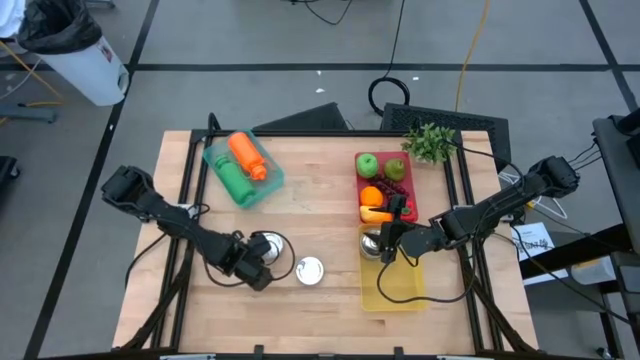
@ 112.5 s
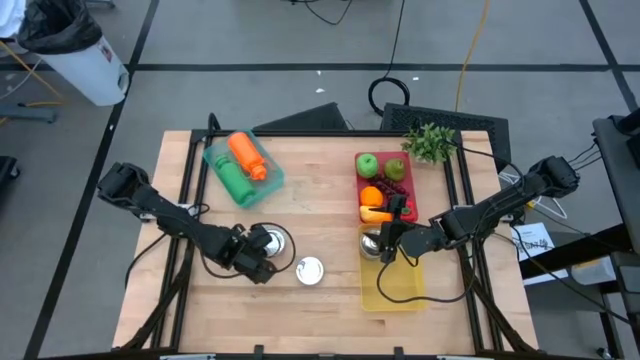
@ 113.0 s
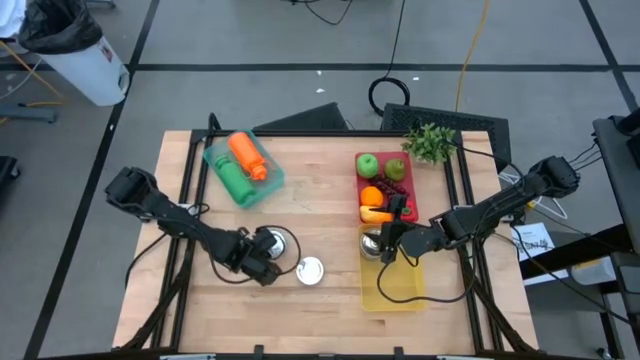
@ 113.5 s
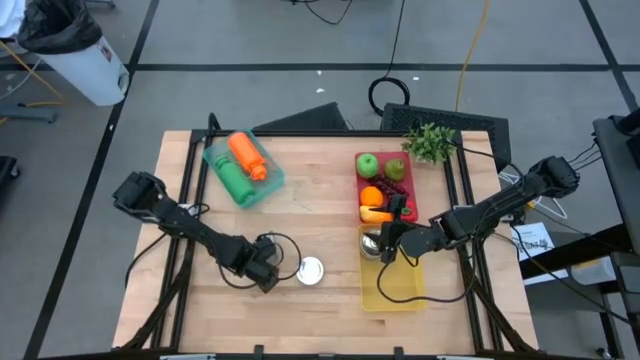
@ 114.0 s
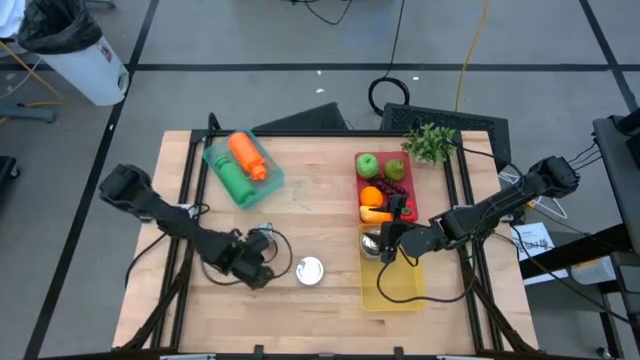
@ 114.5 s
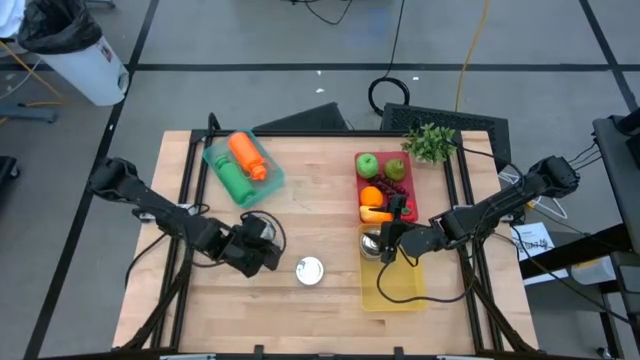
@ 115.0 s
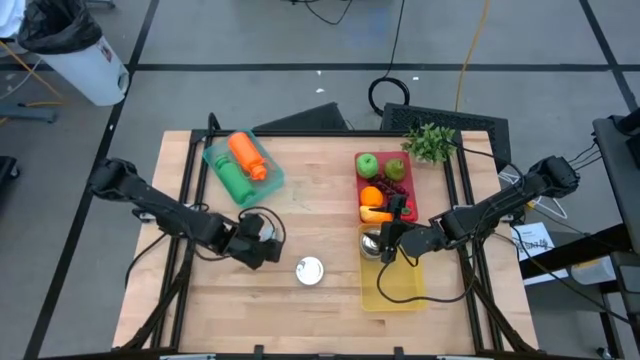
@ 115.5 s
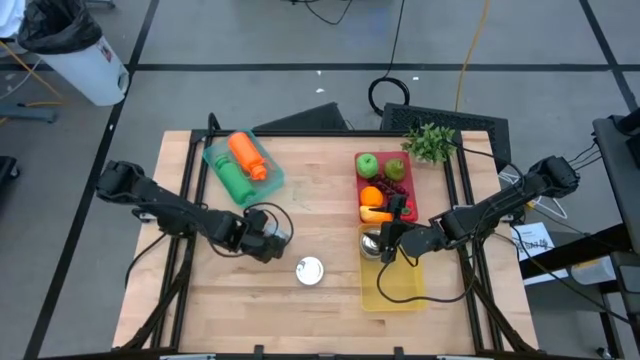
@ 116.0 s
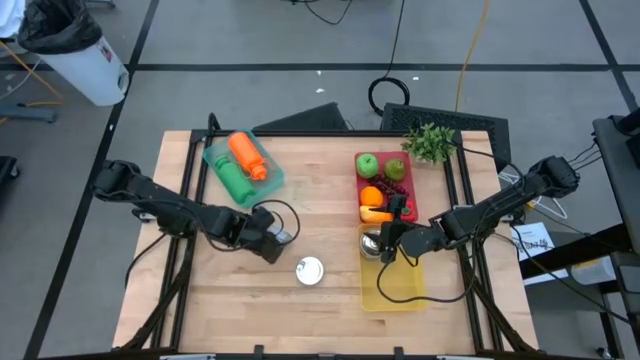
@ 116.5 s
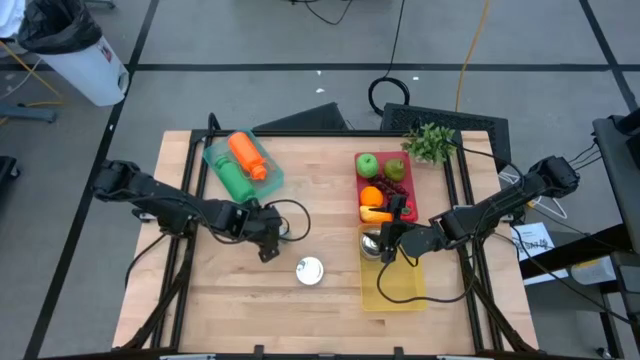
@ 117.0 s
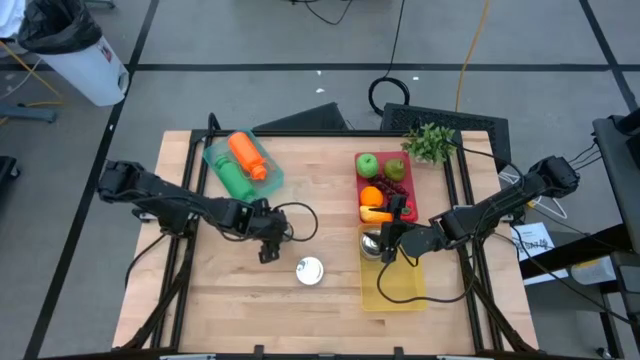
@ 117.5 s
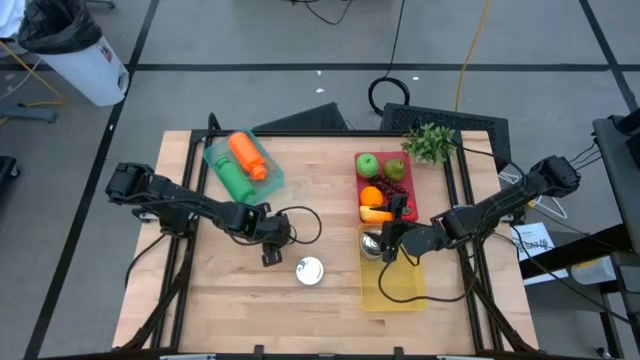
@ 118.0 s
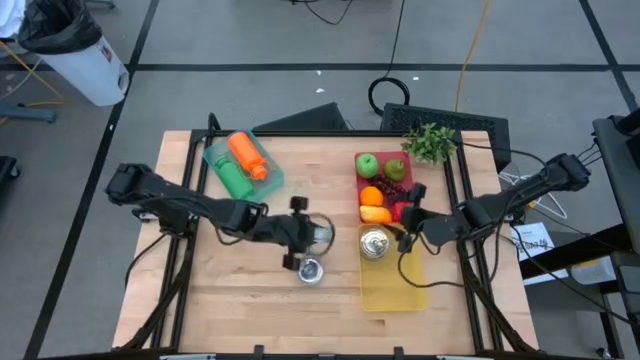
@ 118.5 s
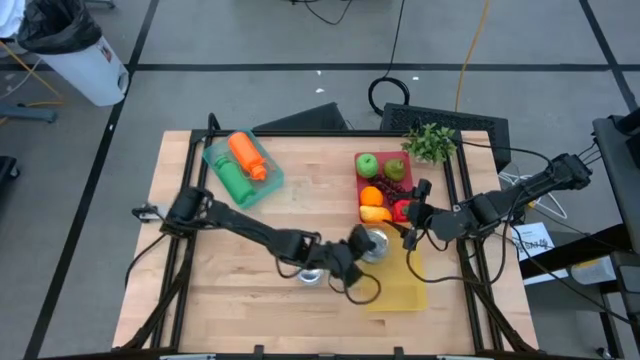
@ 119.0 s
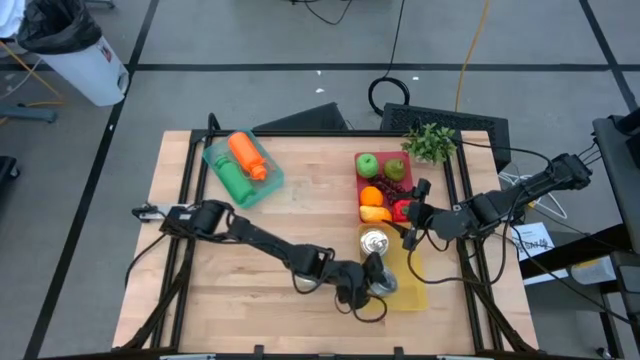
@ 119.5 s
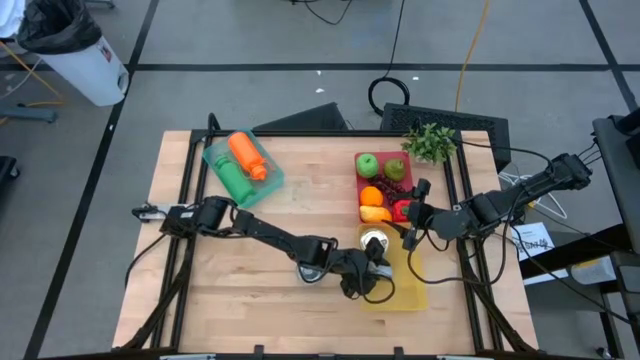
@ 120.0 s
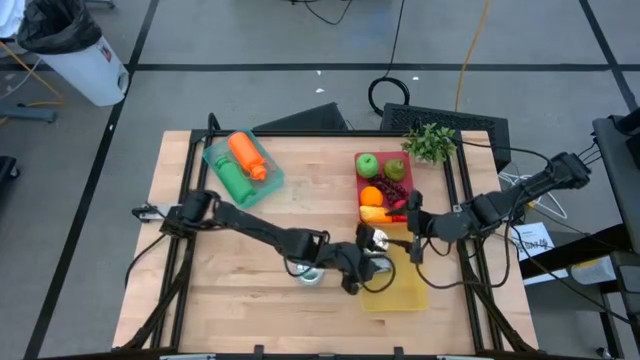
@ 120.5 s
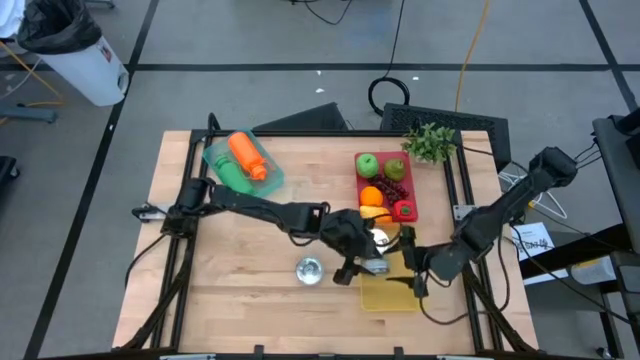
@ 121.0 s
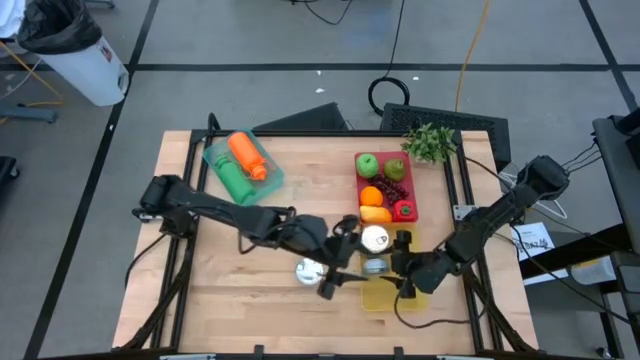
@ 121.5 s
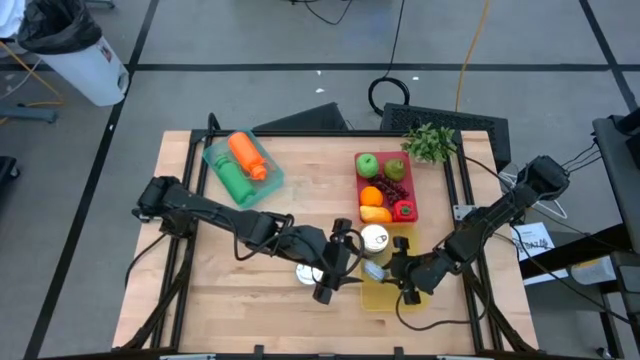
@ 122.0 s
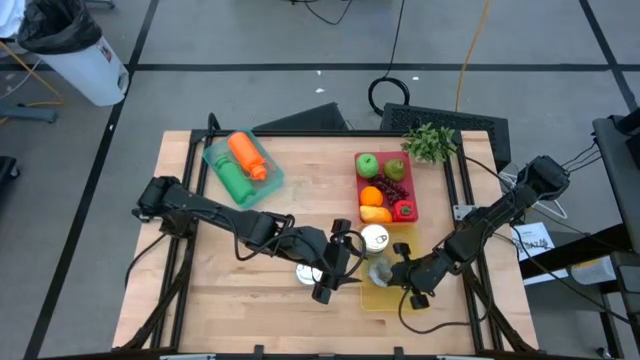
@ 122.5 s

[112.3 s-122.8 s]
Task: Pick & Place Food Item
Put the green tuna can into the yellow bin

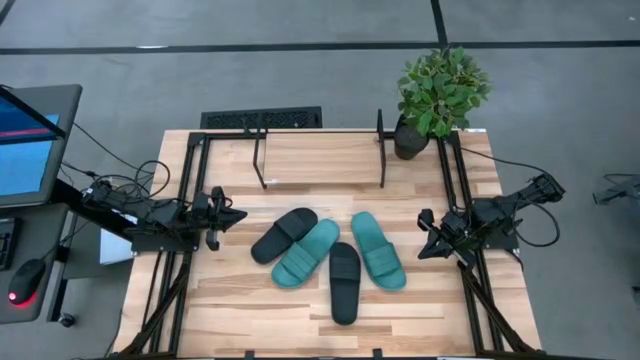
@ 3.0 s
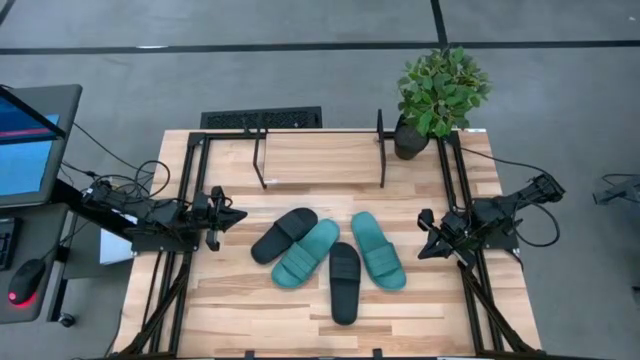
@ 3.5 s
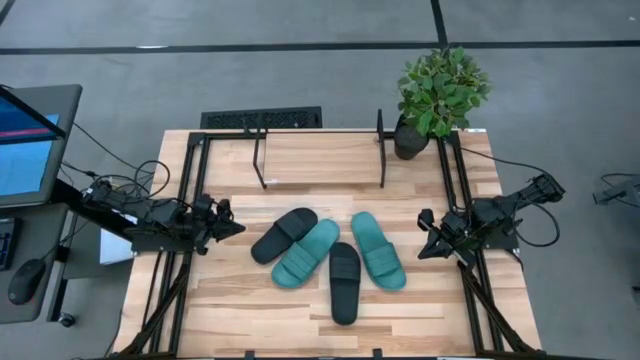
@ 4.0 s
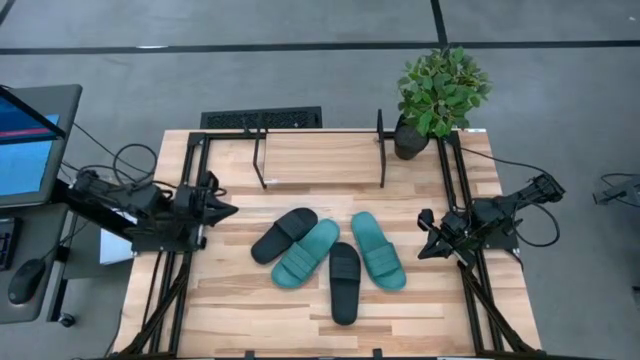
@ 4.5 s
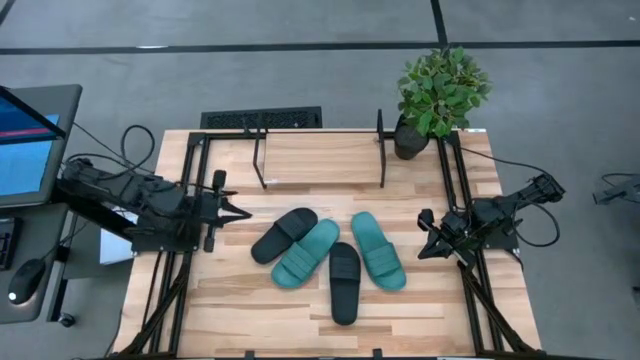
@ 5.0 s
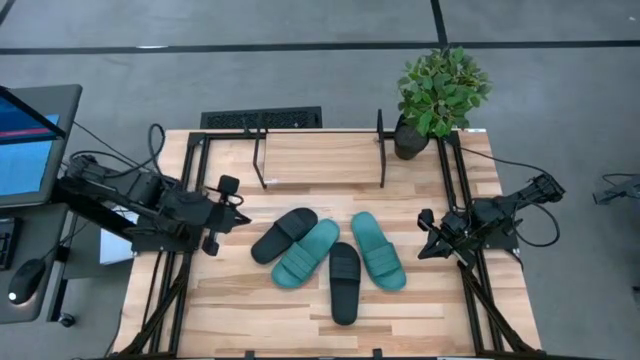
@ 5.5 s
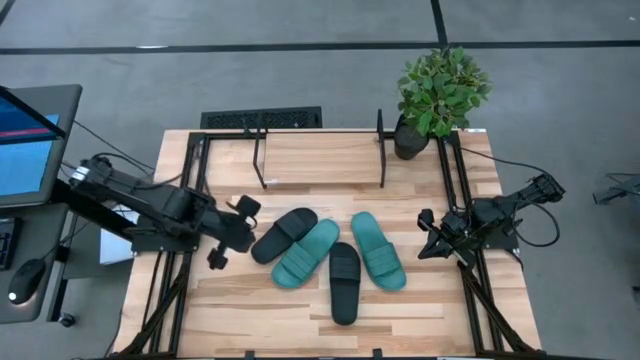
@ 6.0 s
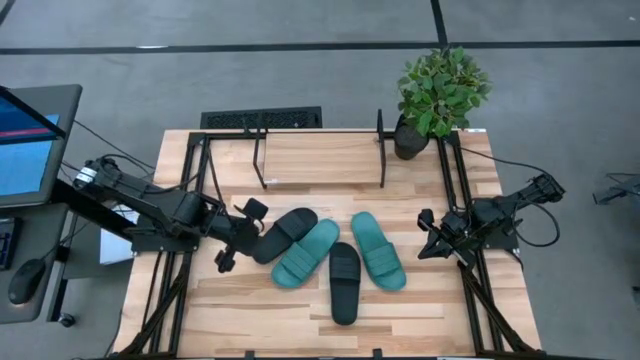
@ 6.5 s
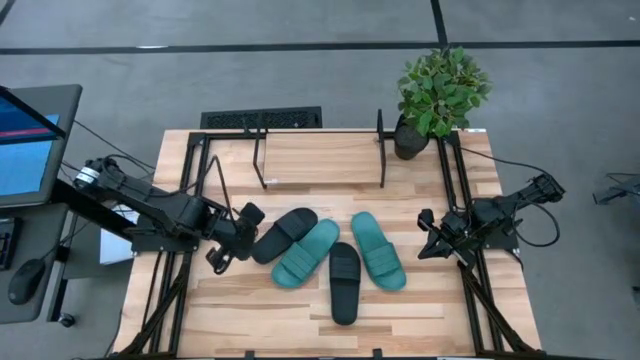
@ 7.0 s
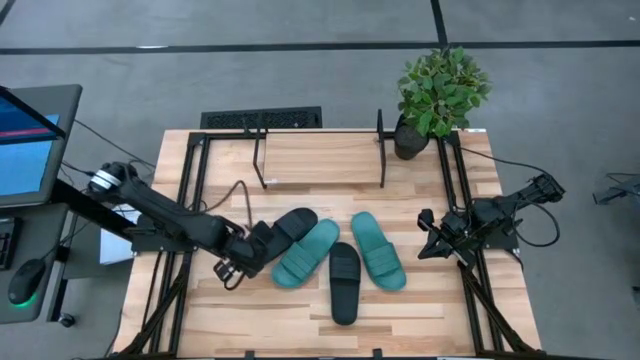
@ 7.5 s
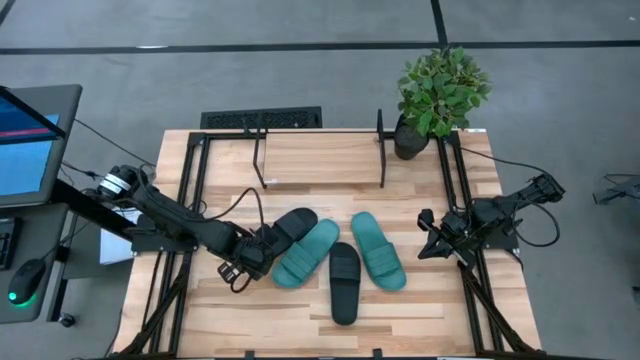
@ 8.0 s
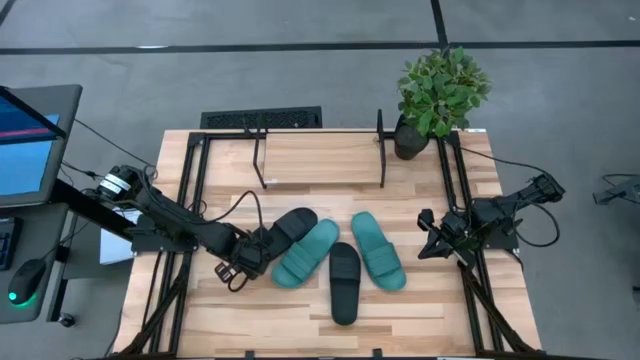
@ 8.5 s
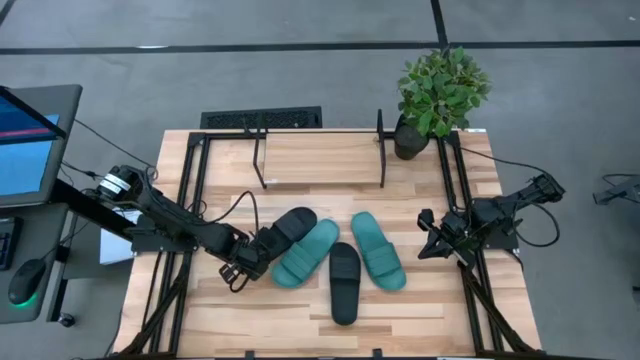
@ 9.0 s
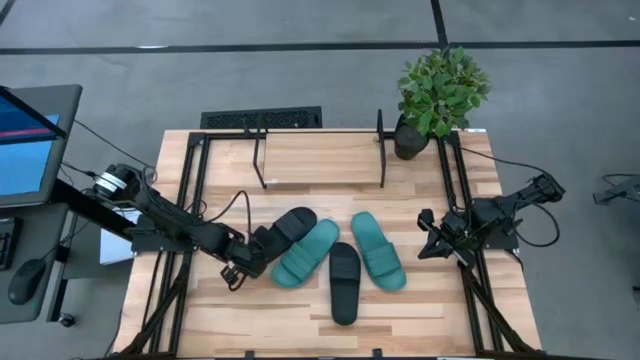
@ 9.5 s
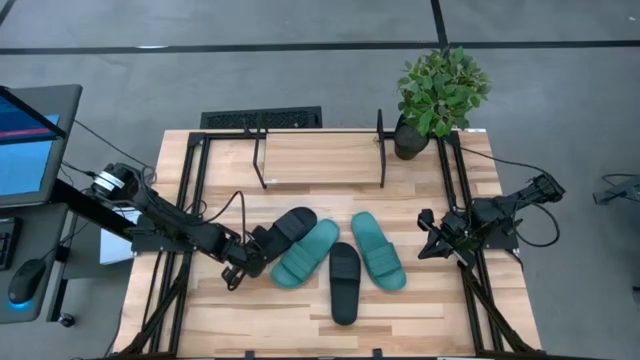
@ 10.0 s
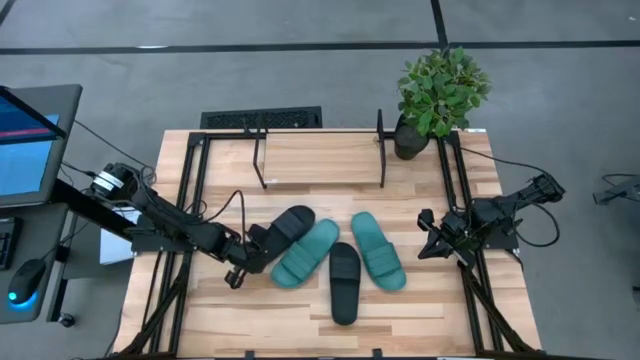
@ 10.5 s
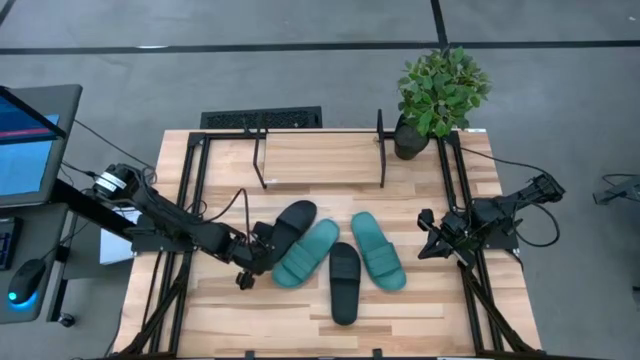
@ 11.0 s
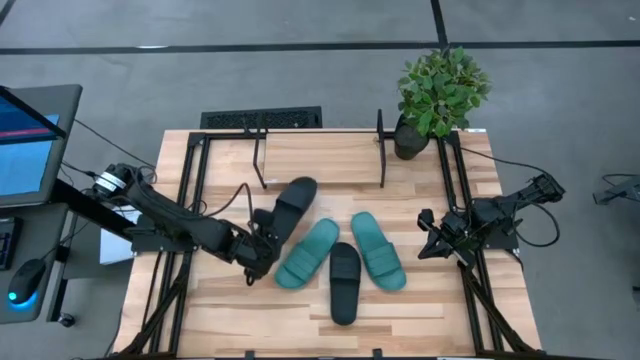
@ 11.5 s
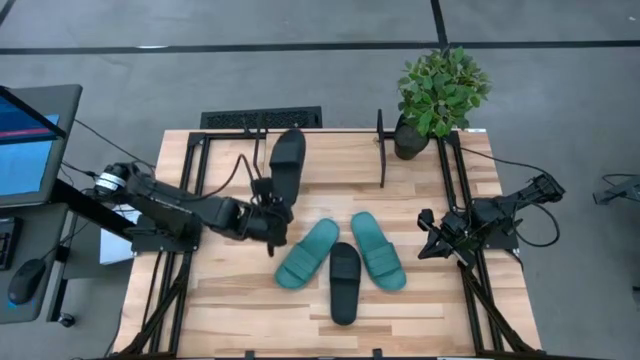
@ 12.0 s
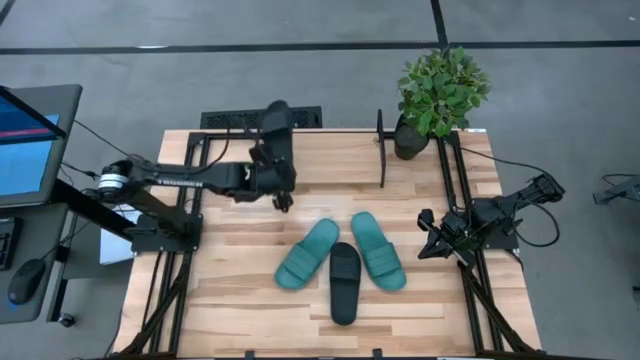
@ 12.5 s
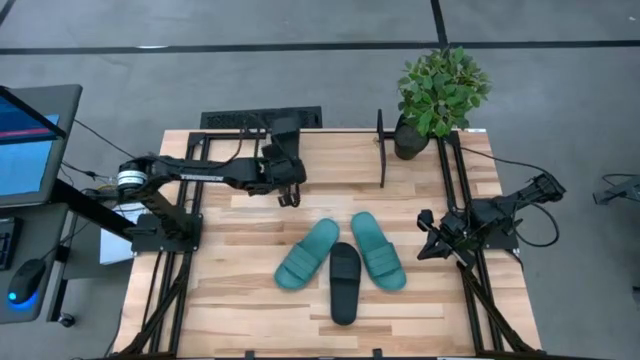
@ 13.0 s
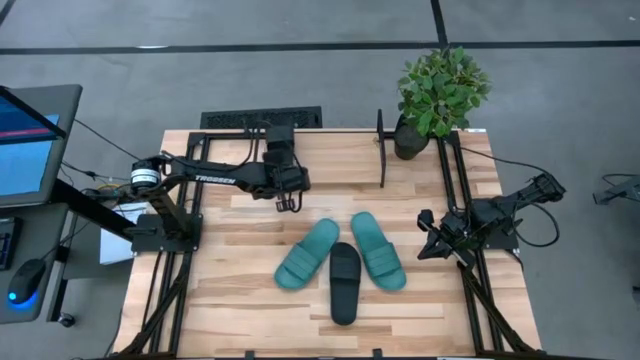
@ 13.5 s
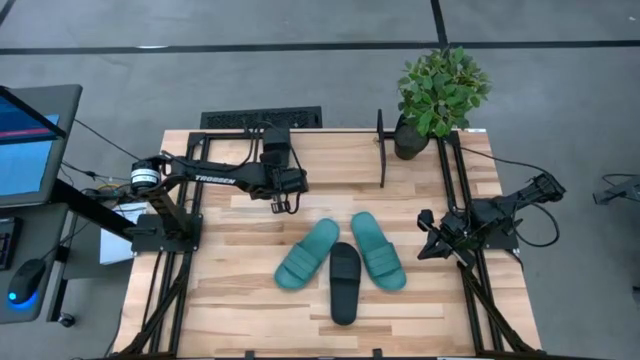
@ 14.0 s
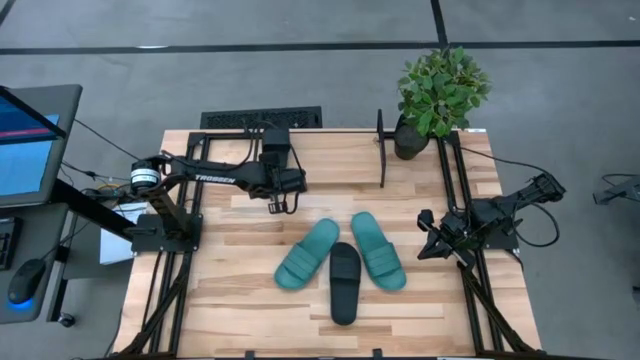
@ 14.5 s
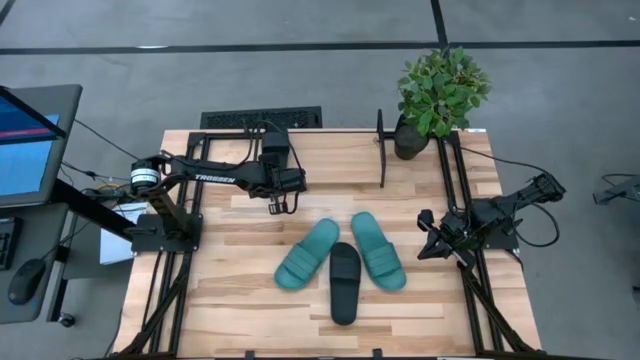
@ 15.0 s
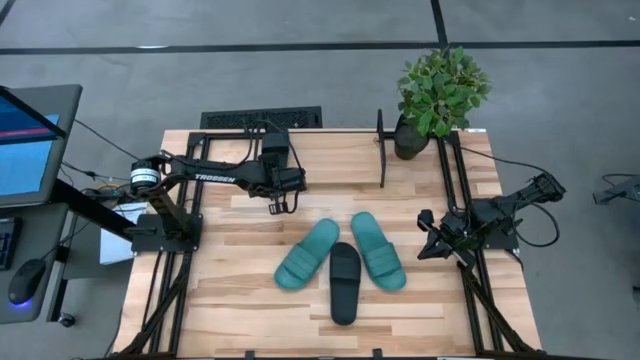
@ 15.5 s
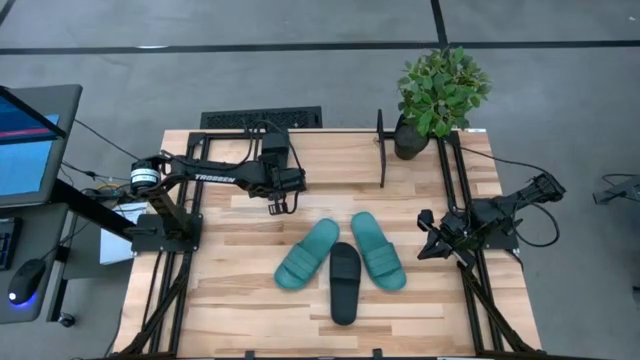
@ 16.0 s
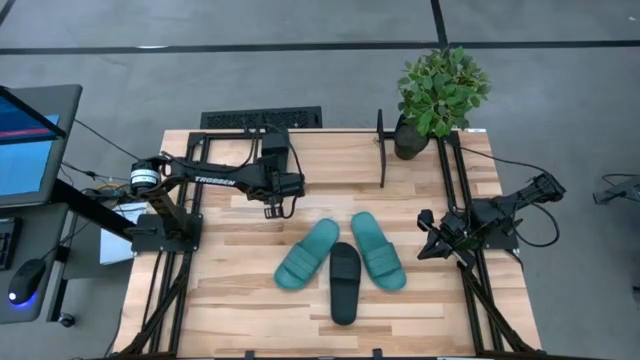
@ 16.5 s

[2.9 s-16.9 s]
Task: Pick and place slides into the shelf
Put the top black slide on the shelf
